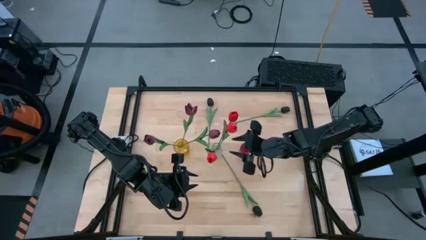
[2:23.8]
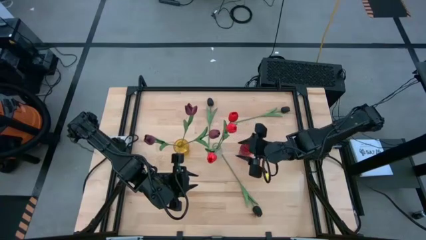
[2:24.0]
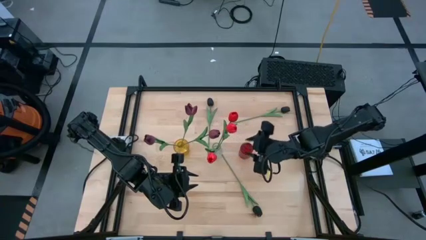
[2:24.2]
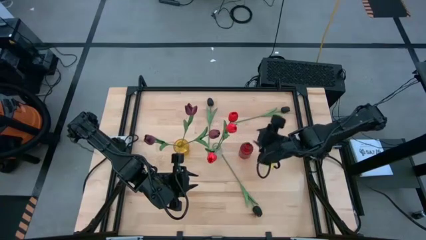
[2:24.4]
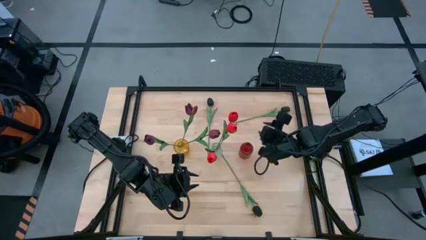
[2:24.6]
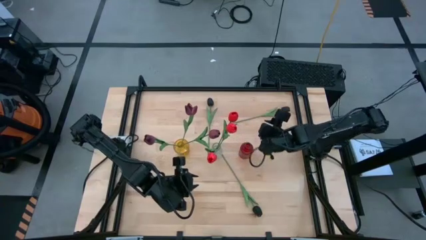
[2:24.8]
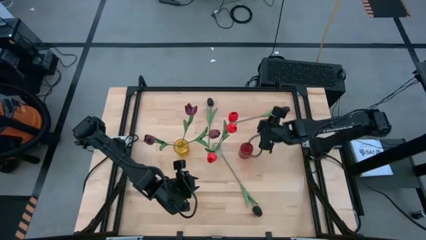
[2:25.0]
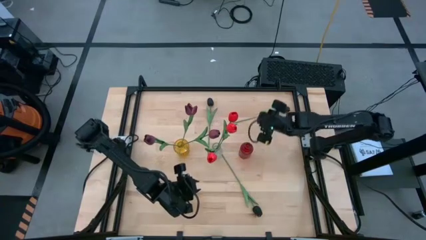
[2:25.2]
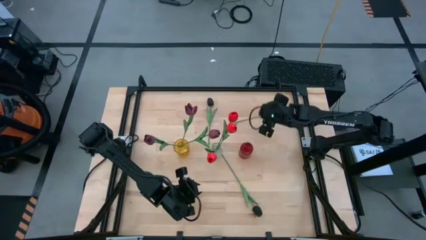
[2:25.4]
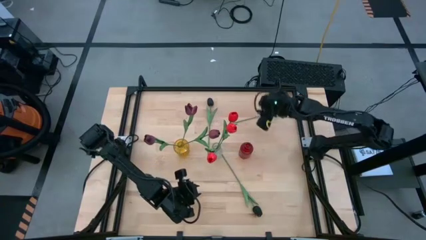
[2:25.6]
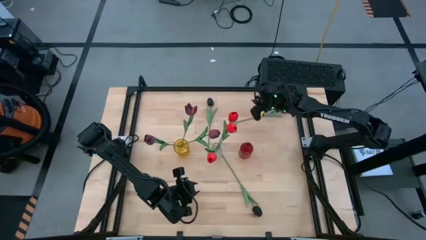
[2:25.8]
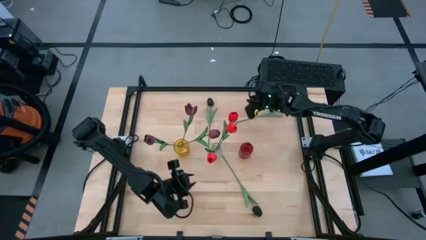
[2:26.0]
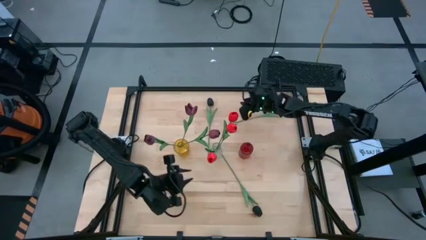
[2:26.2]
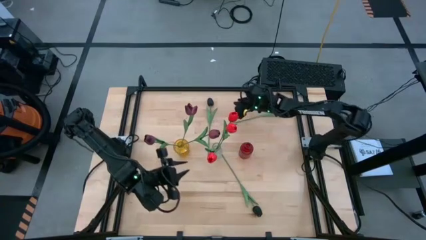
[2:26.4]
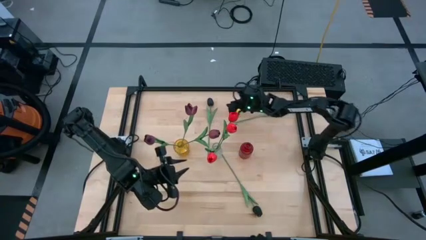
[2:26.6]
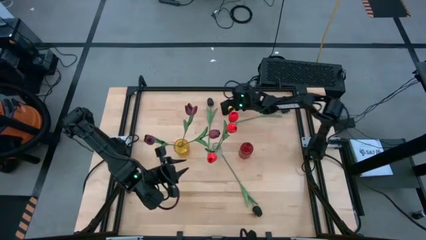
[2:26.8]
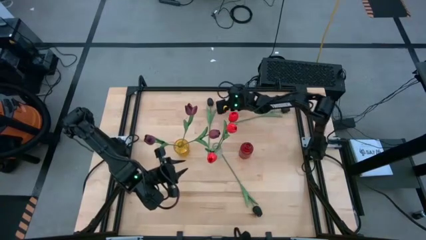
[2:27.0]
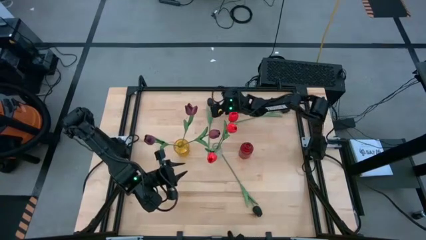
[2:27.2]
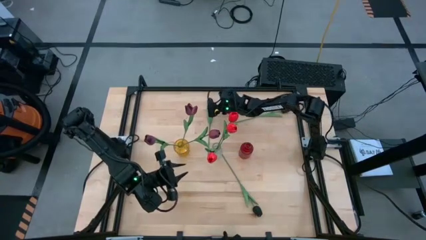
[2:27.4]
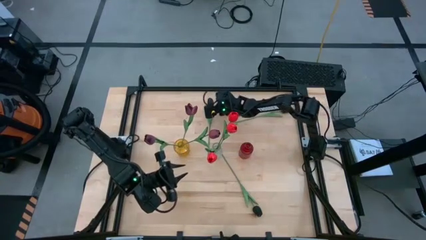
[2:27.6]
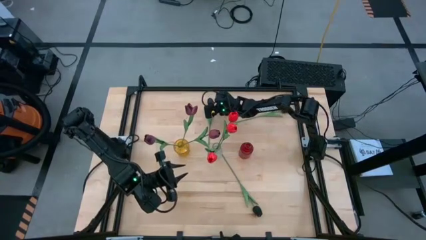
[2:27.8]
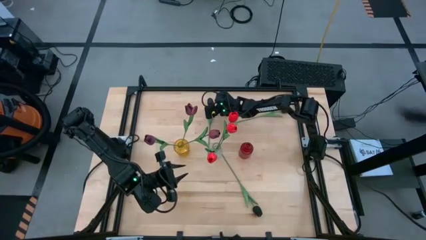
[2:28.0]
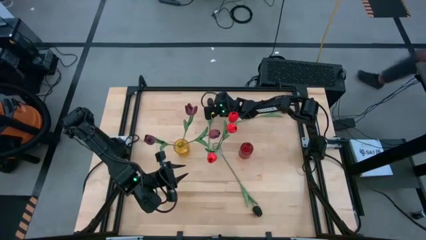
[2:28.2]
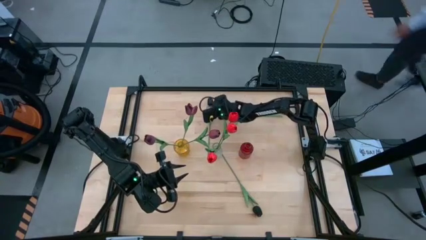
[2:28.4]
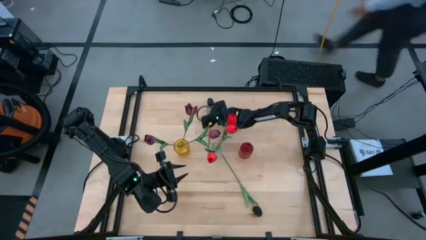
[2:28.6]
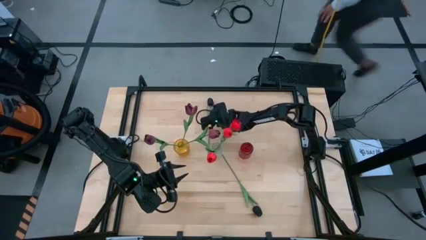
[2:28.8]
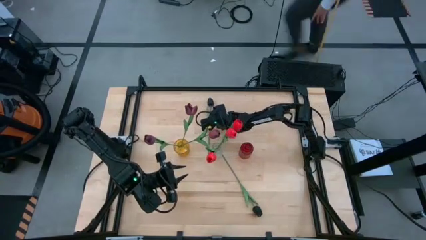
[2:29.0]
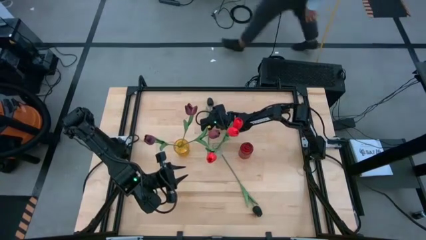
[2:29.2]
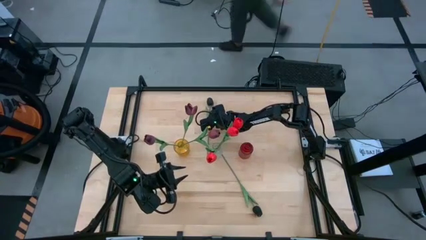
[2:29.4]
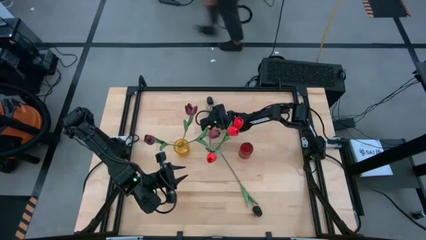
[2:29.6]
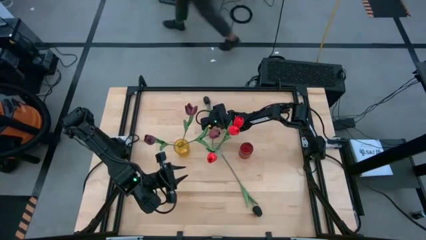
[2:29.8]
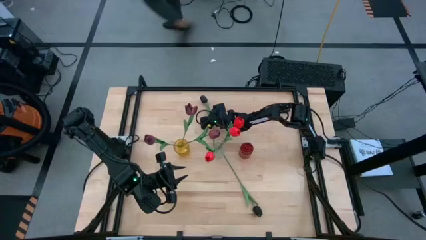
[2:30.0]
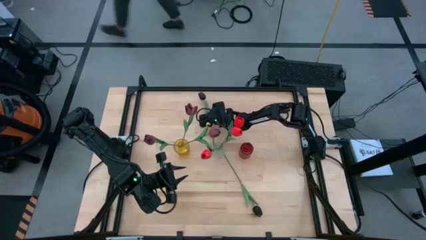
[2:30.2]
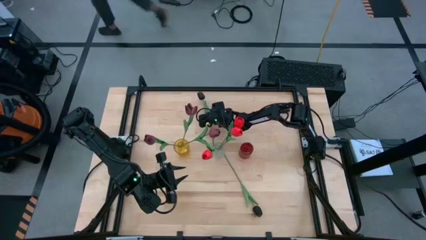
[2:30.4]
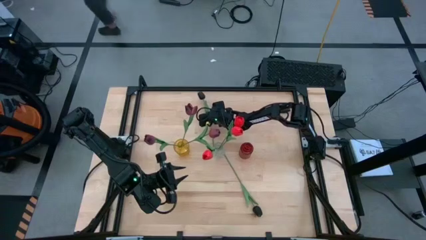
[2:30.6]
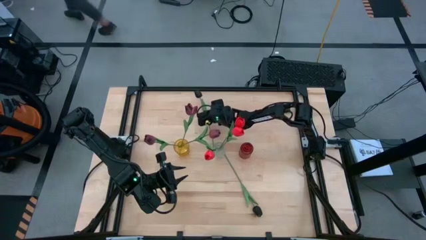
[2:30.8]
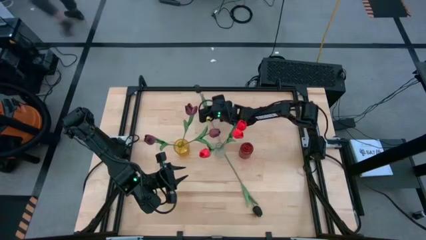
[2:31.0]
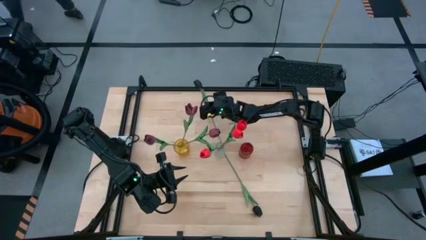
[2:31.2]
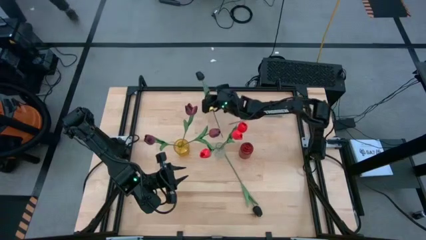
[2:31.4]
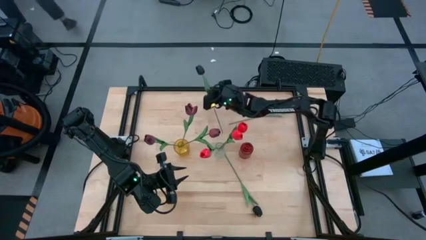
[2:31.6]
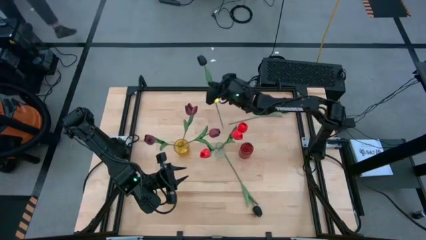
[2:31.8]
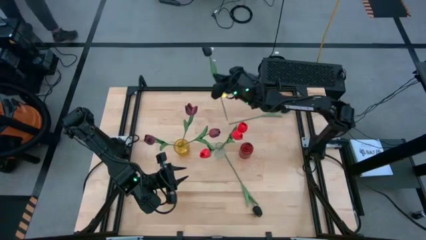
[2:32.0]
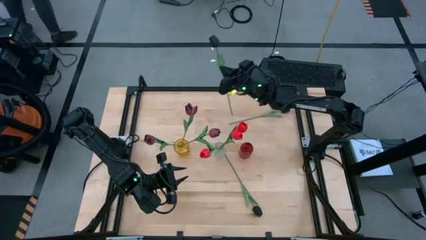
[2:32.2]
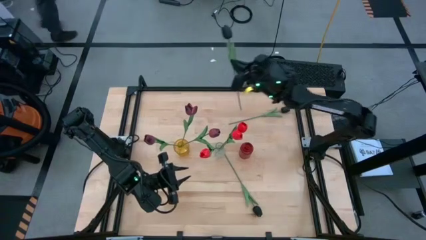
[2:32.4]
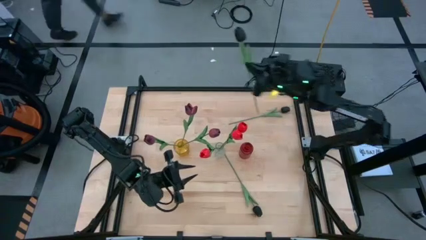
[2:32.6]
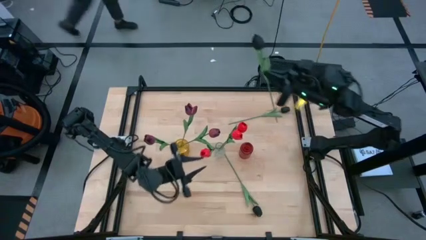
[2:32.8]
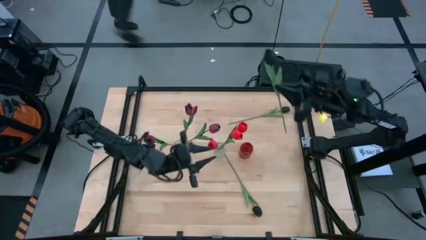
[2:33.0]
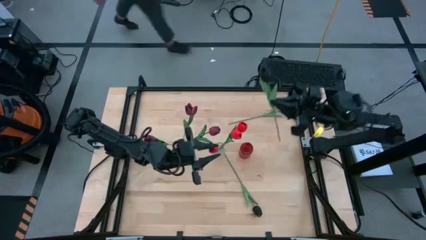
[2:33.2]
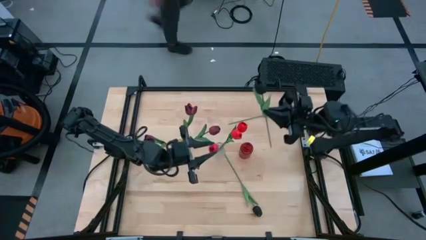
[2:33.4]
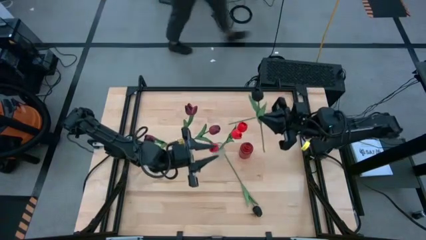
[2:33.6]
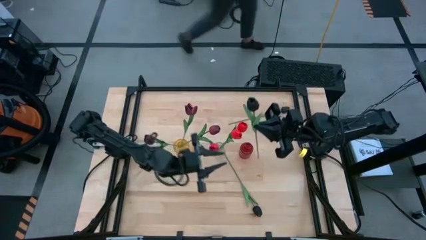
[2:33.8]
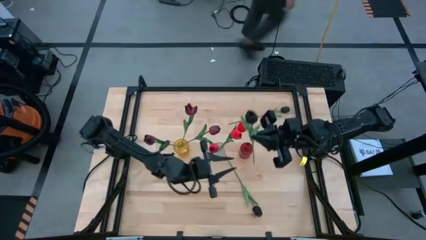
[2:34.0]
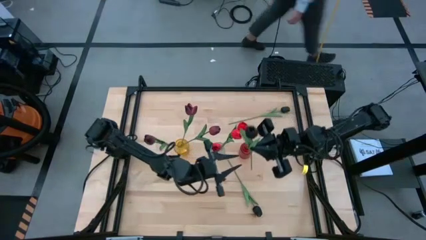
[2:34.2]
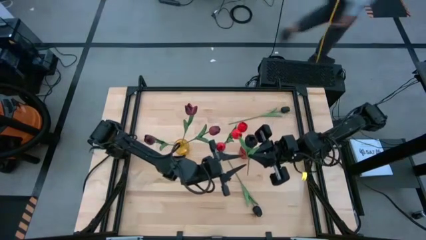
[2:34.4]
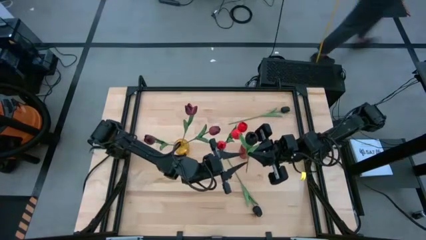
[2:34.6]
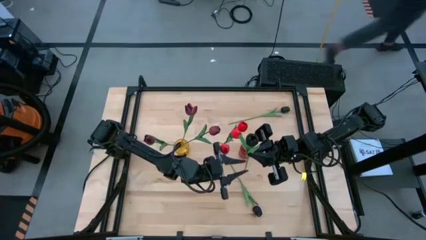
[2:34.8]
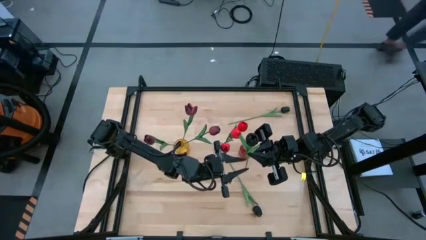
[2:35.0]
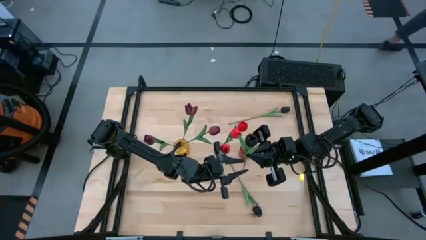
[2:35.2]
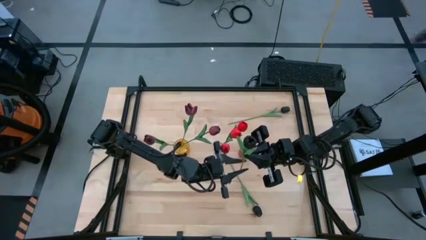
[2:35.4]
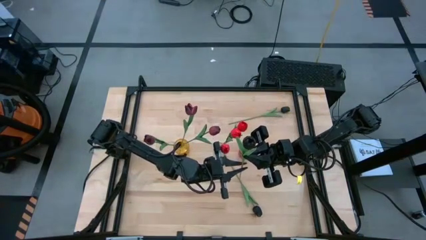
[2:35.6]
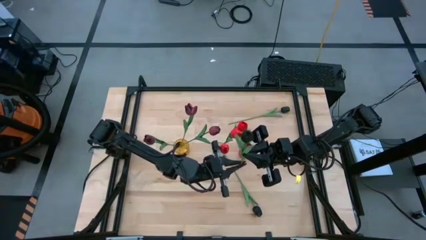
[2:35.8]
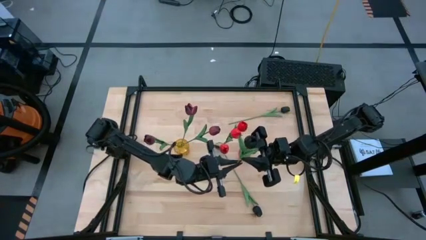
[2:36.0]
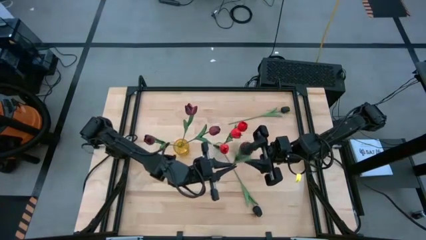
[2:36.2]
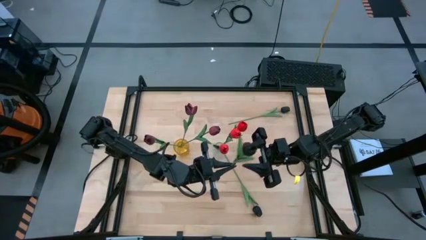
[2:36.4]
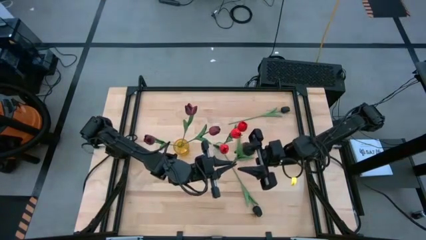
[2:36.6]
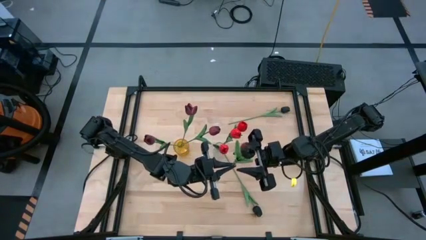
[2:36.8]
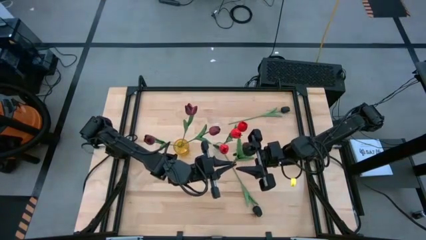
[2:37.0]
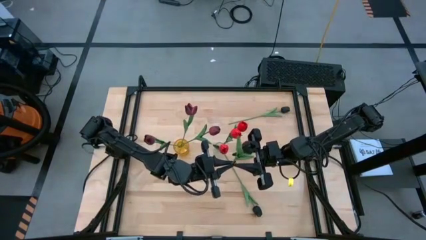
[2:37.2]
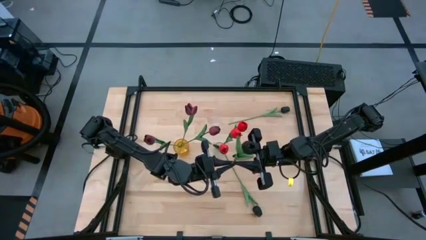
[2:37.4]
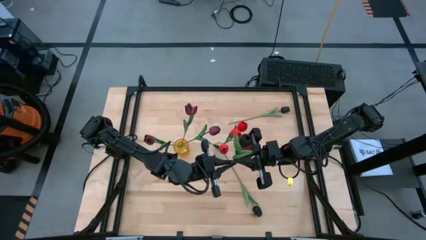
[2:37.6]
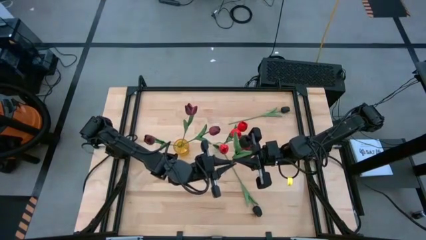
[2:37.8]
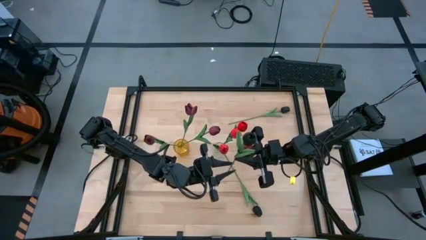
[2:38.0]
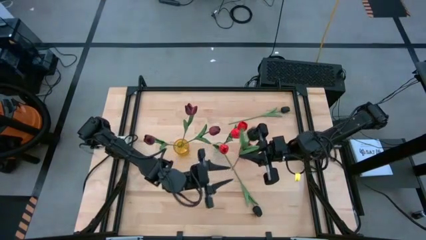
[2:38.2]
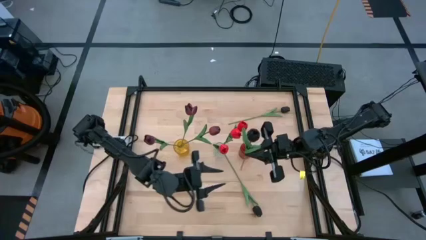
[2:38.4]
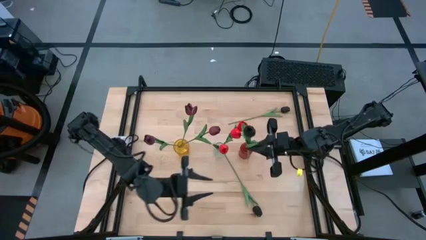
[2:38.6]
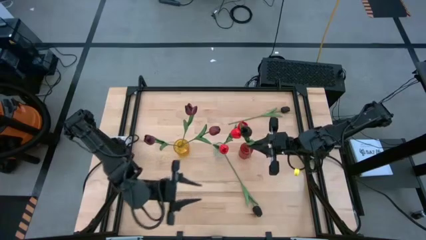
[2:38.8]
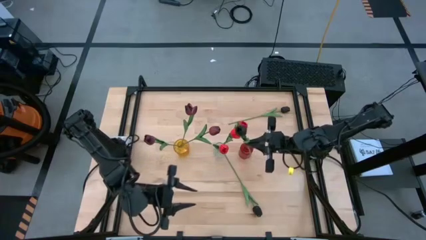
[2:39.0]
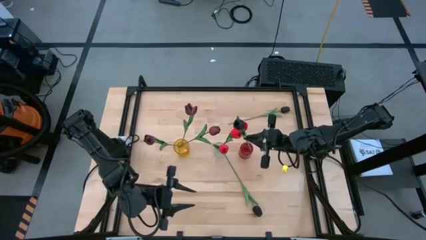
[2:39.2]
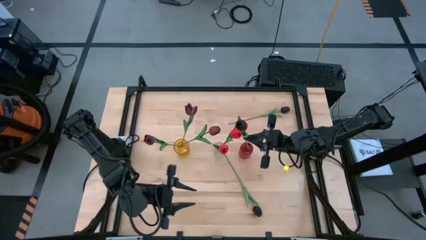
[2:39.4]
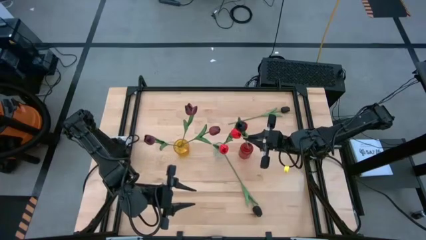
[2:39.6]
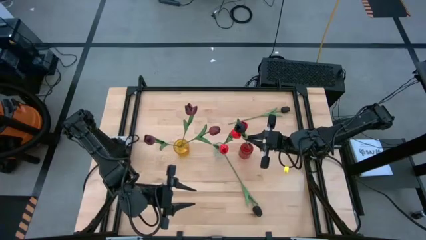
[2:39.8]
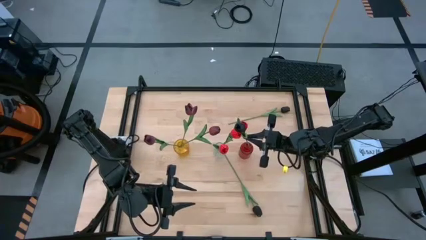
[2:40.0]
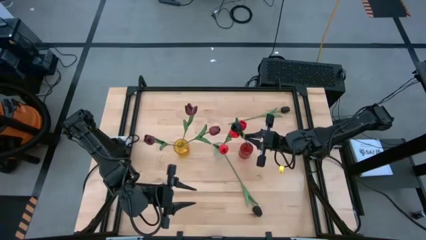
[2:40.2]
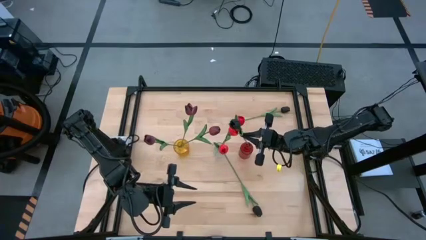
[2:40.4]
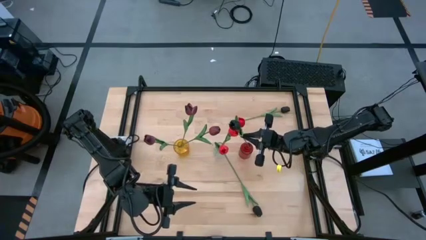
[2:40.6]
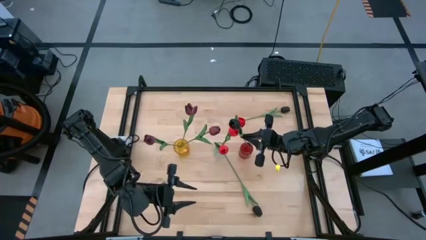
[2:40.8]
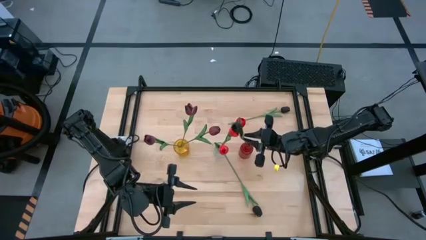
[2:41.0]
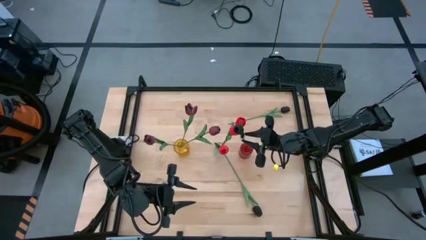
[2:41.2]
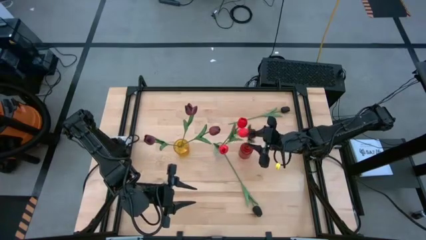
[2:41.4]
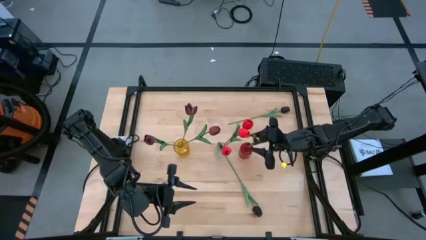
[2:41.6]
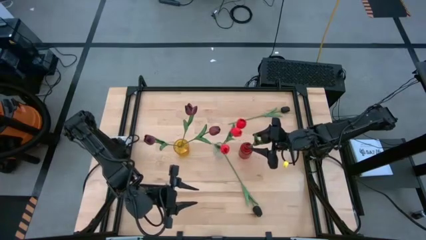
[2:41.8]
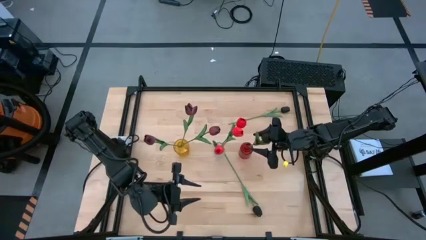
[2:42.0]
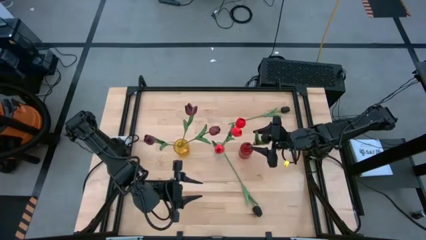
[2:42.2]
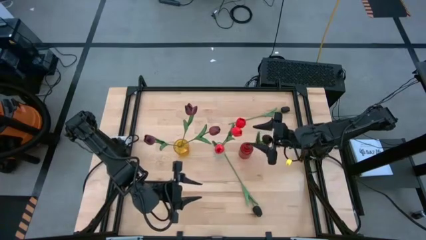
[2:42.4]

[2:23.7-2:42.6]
Task: Sort flowers into vase by color
Put the top left black tulip into the red vase
